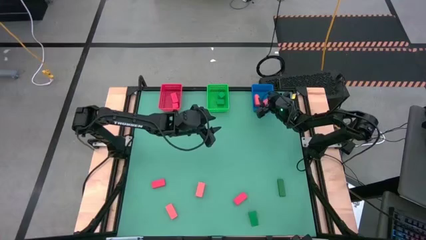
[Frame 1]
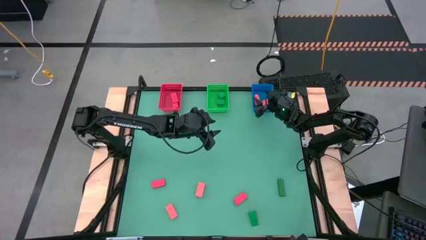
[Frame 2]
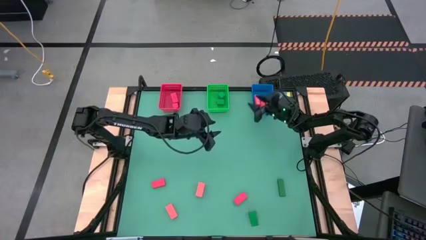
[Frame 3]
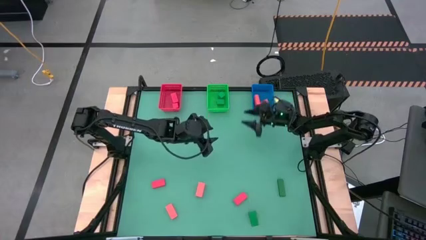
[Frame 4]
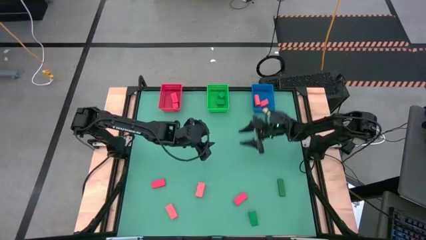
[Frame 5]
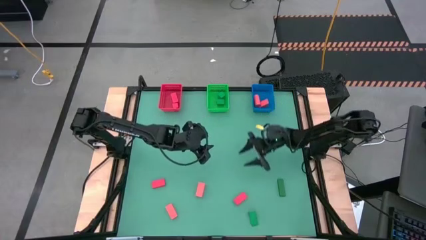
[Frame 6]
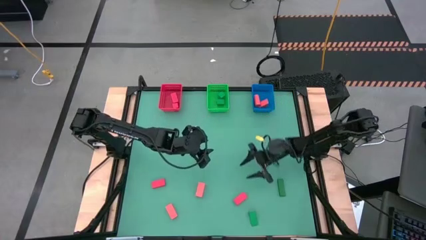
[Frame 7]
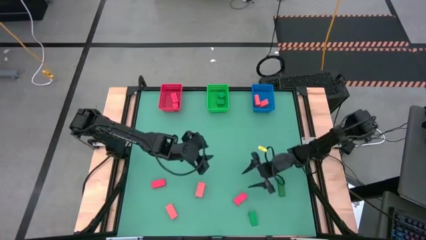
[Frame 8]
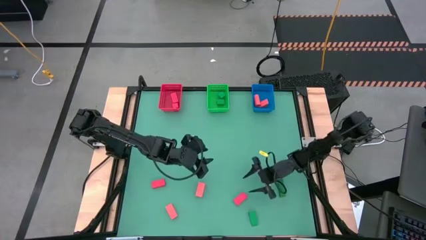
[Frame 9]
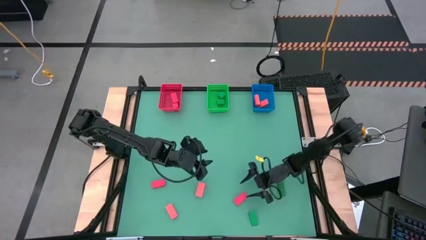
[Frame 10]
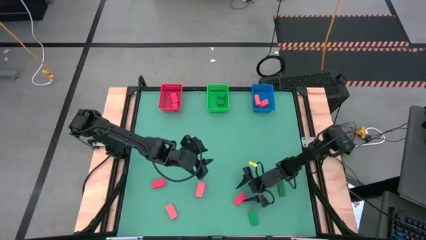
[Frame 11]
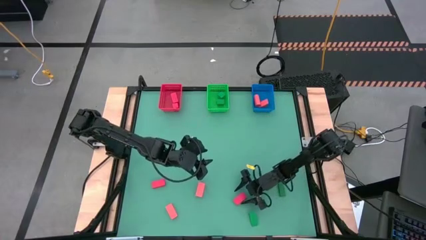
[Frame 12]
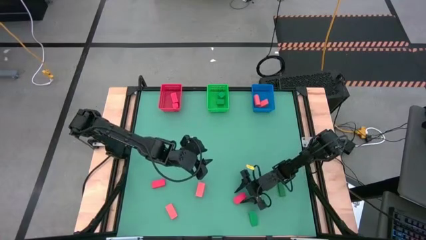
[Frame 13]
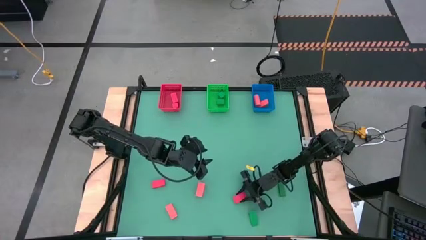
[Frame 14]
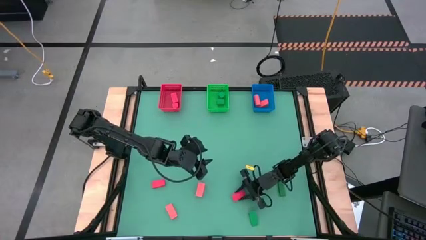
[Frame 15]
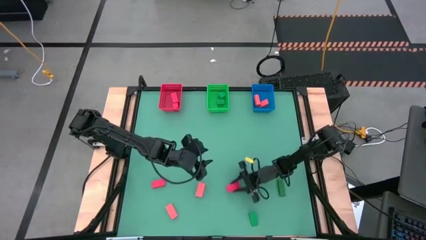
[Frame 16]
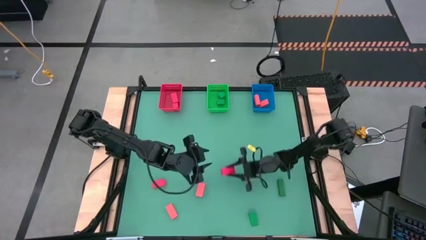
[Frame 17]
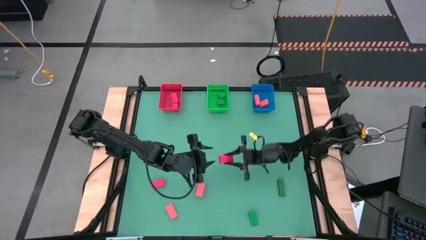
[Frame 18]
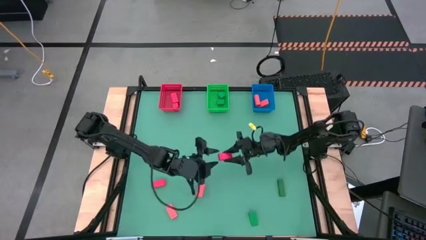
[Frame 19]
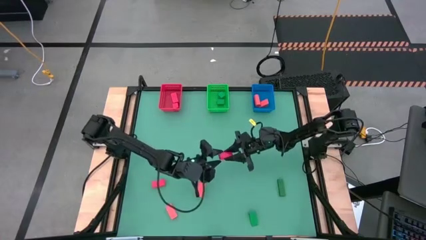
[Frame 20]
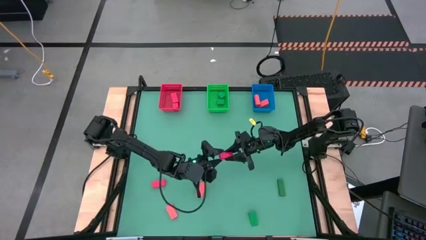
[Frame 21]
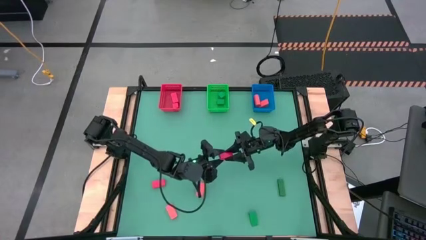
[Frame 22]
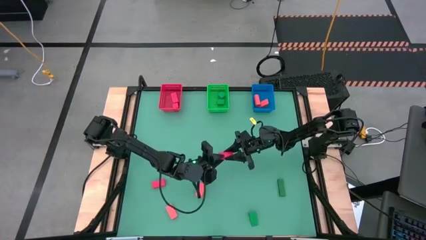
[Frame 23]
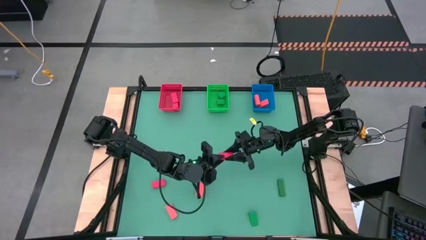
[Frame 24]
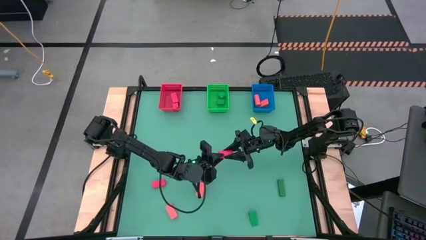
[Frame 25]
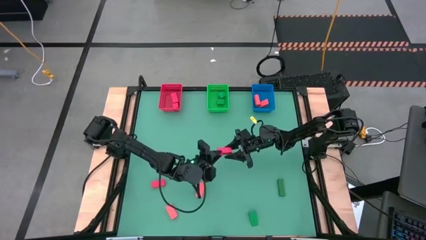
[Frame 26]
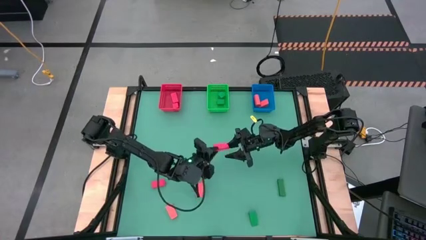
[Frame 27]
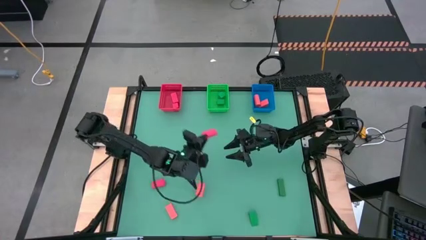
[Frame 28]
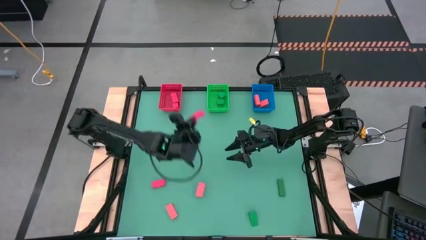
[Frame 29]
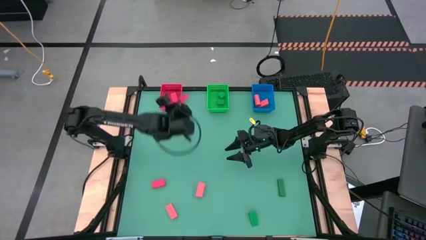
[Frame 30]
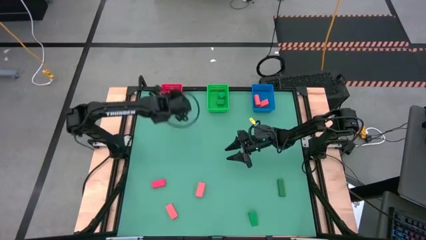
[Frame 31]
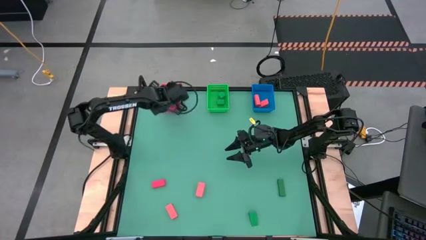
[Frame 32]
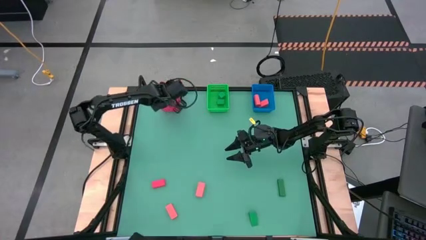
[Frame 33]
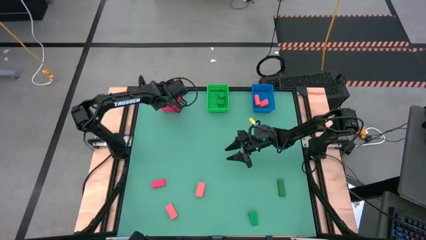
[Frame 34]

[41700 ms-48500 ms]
Task: Sort & place blocks by color
Put the red block into the red basket

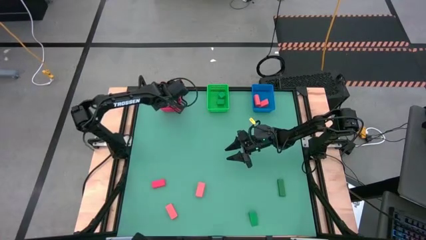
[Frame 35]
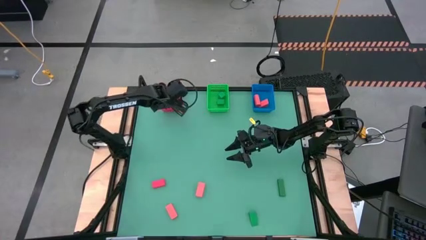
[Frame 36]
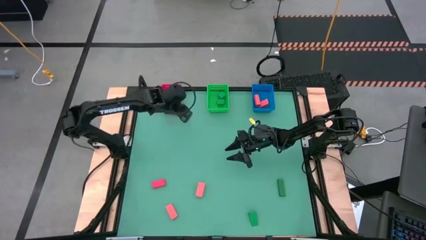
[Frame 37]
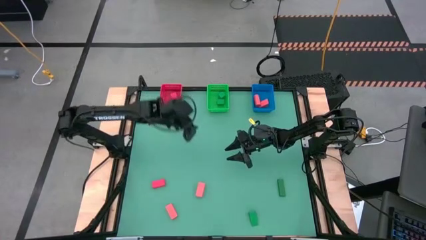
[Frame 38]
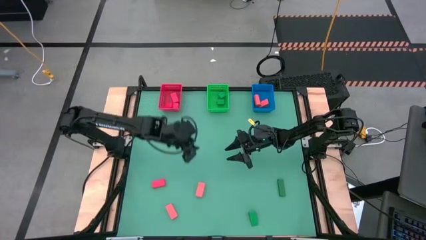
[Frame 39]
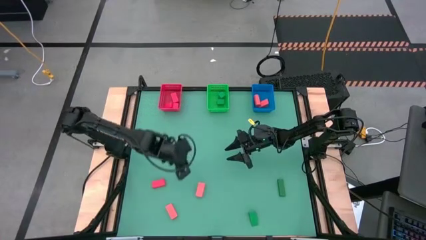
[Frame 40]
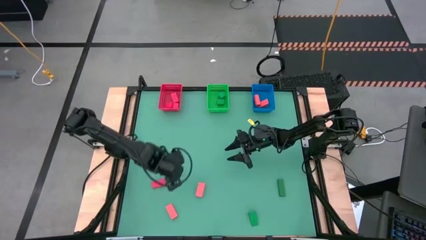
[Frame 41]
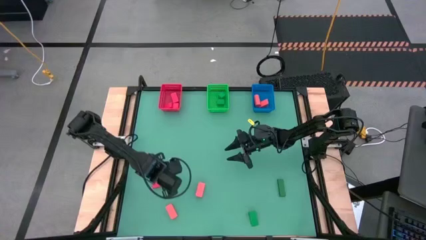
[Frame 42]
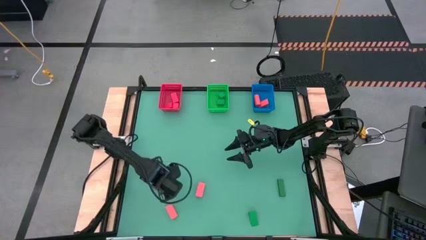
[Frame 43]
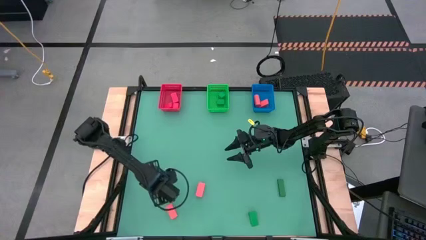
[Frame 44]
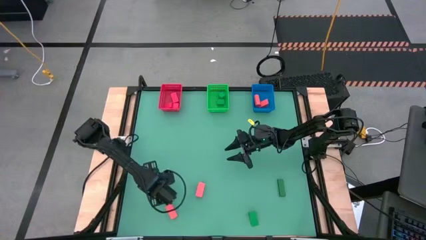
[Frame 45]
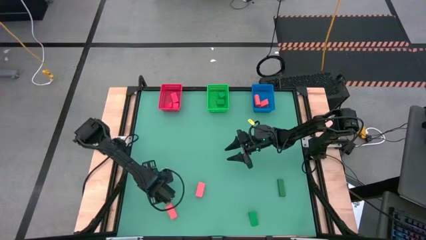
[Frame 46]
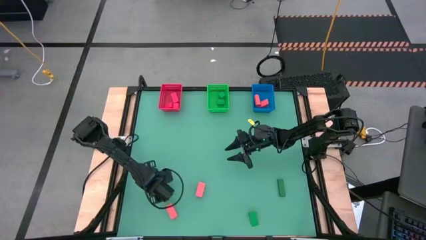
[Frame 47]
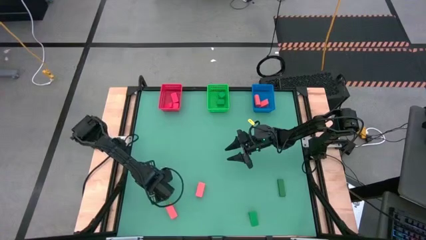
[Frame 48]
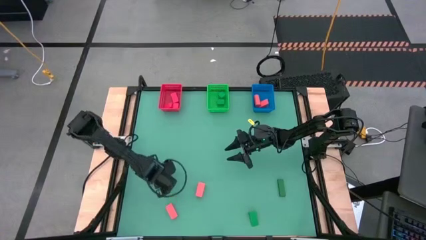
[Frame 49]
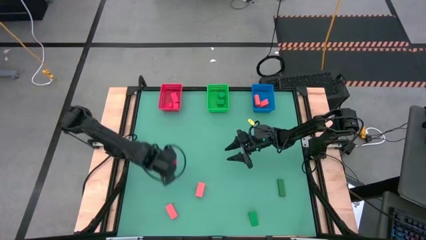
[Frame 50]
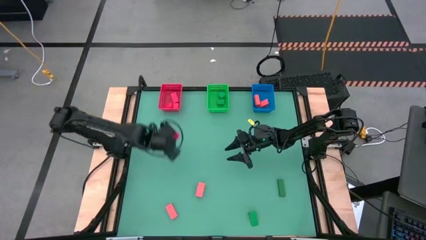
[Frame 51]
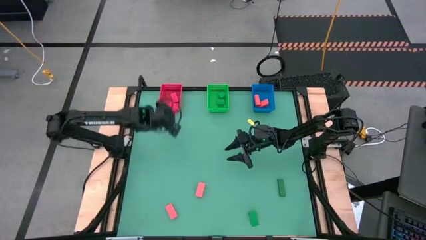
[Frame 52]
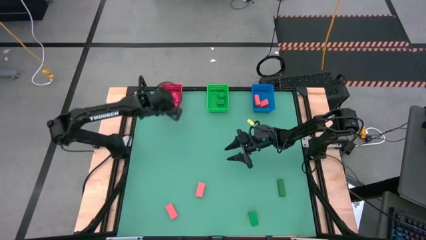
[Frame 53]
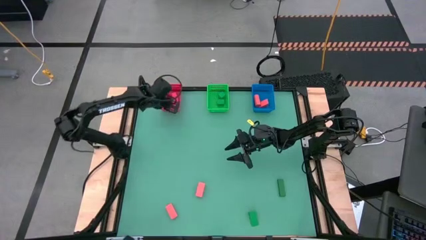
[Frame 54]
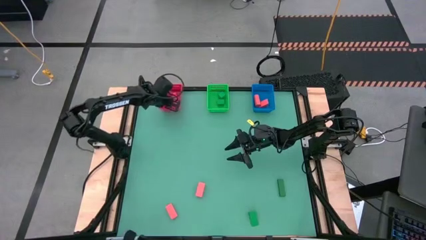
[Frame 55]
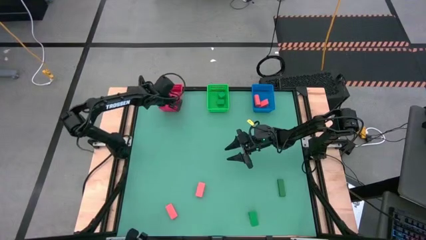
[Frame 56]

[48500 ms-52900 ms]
Put the red block into the red basket

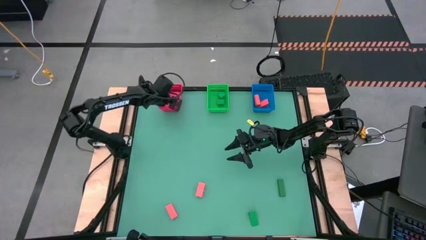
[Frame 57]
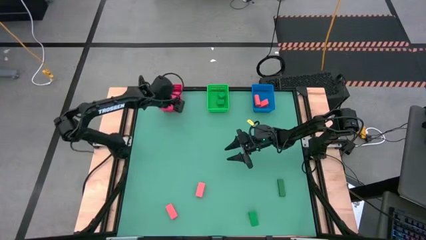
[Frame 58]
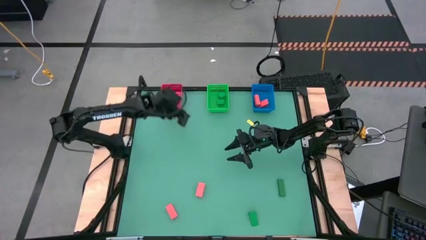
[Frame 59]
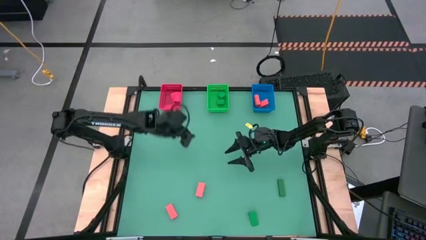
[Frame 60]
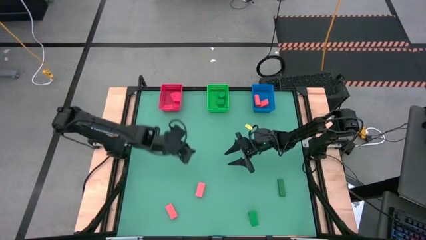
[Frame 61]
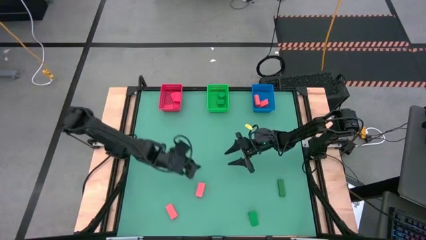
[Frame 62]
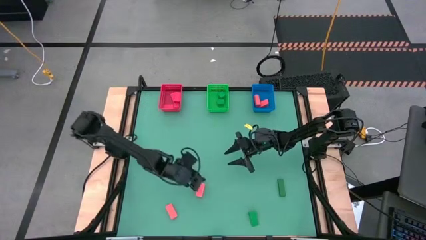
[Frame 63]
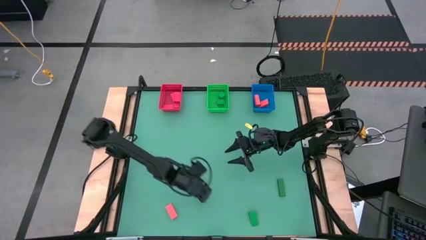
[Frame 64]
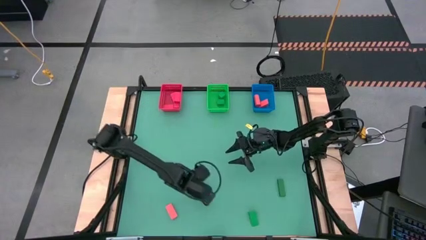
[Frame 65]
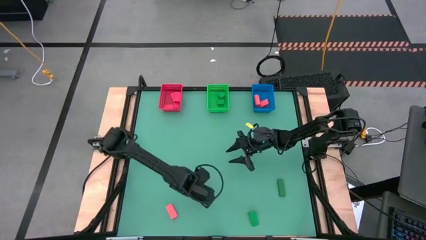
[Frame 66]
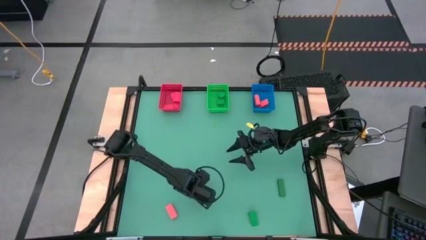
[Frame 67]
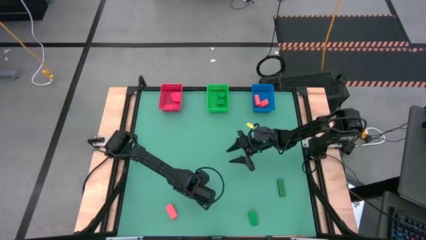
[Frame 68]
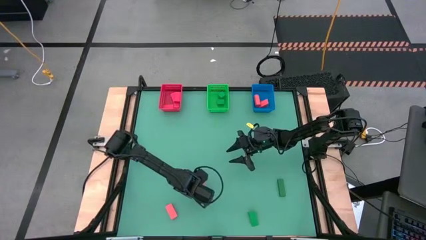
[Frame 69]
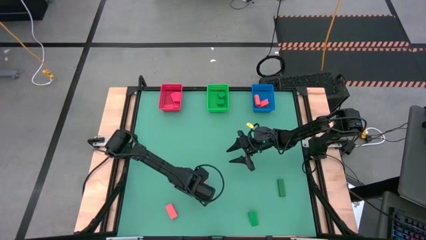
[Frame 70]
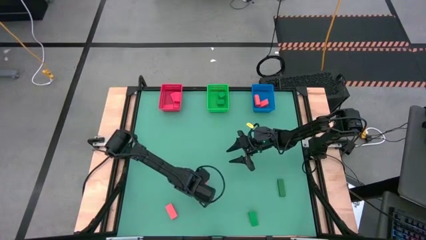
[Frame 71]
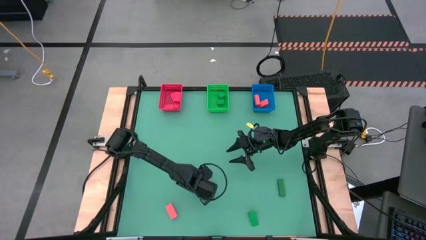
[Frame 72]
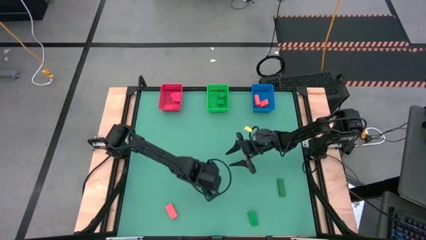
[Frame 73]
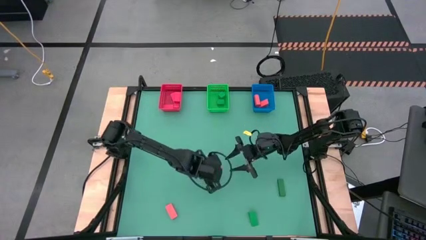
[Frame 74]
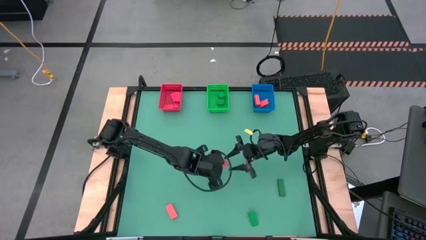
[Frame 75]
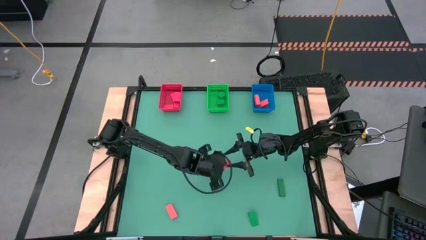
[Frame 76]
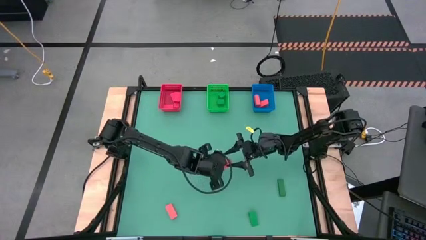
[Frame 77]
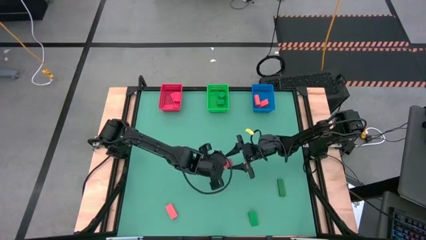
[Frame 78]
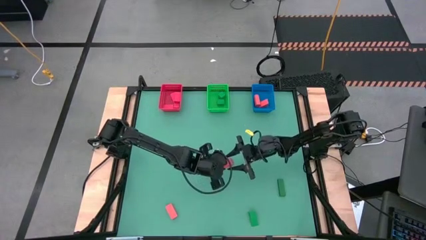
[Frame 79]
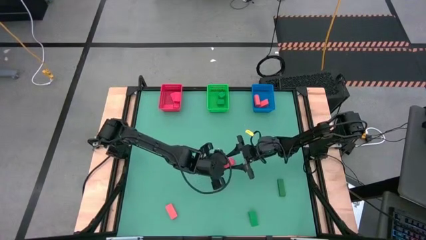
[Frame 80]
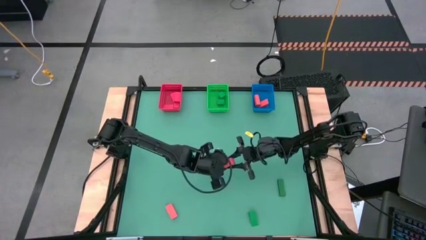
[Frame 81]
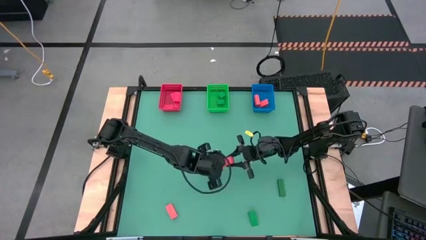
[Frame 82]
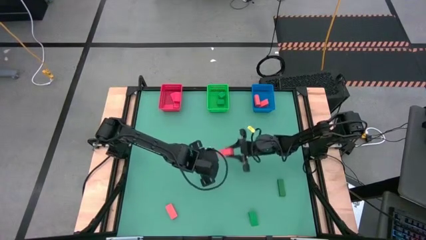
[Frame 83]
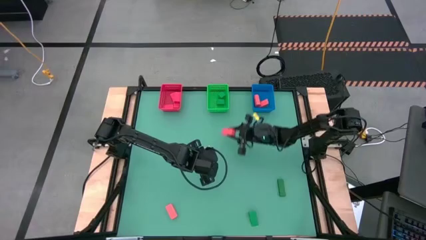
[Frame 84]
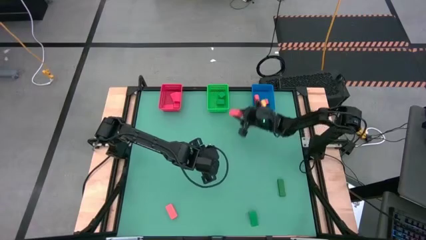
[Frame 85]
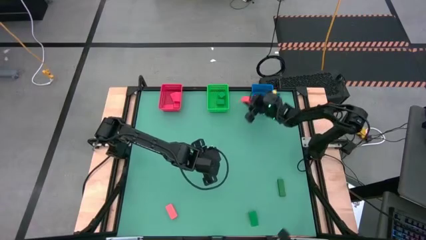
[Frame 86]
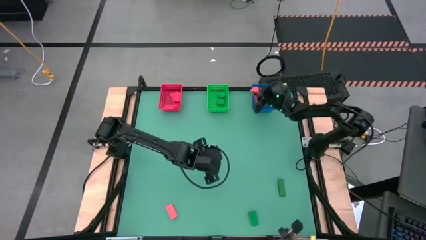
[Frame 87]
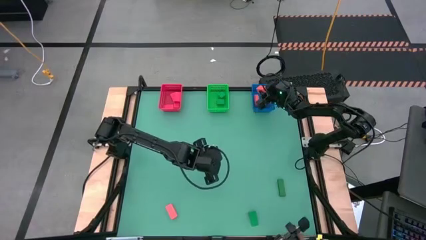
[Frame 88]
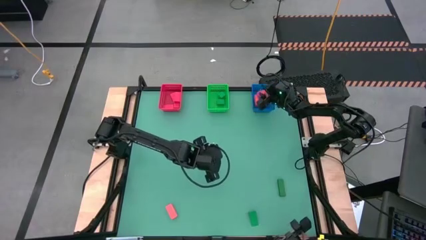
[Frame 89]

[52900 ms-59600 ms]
Put the orange block into the blue basket
